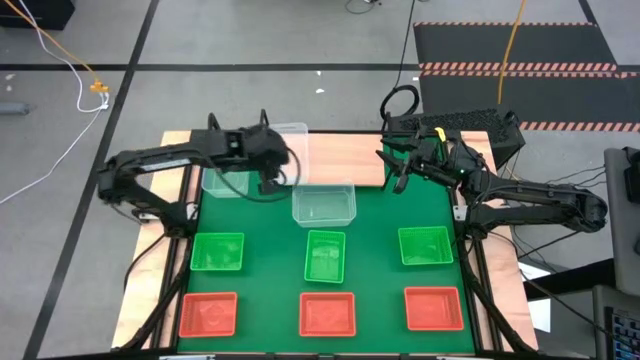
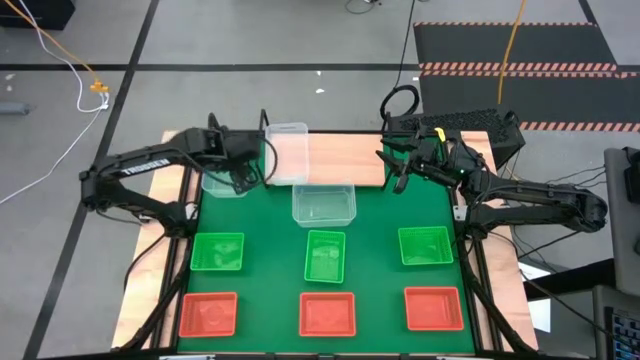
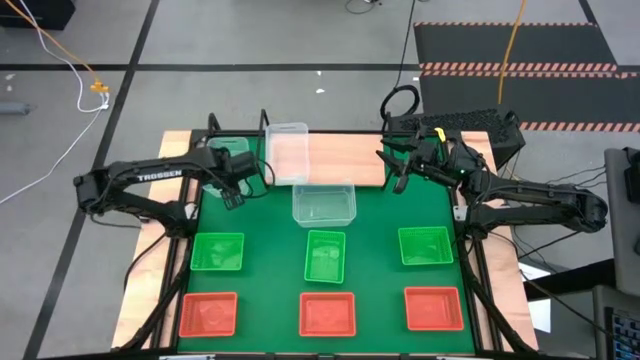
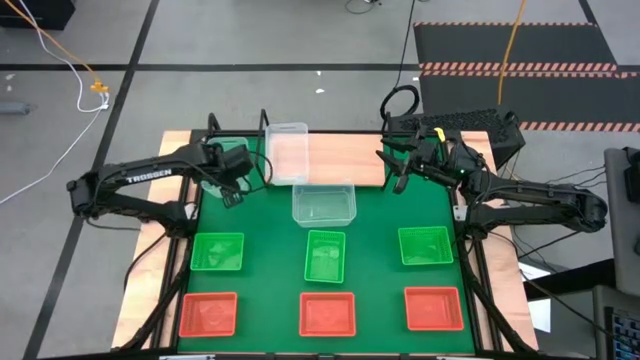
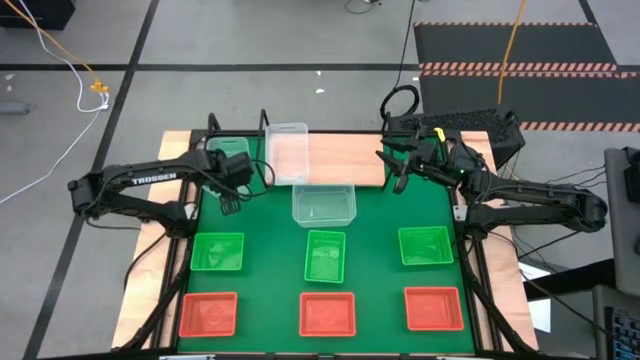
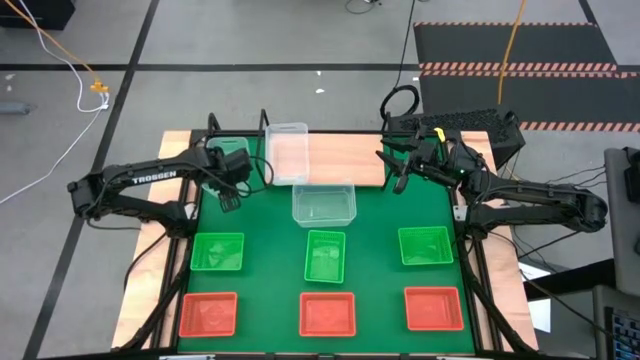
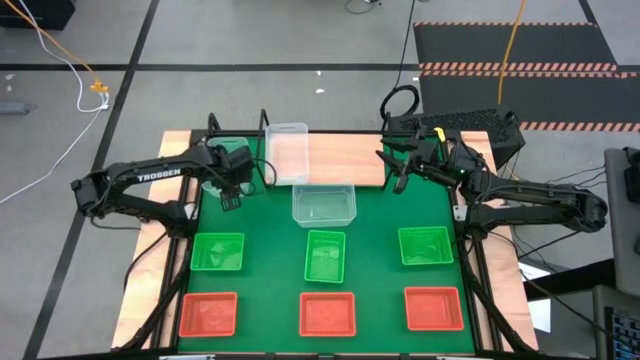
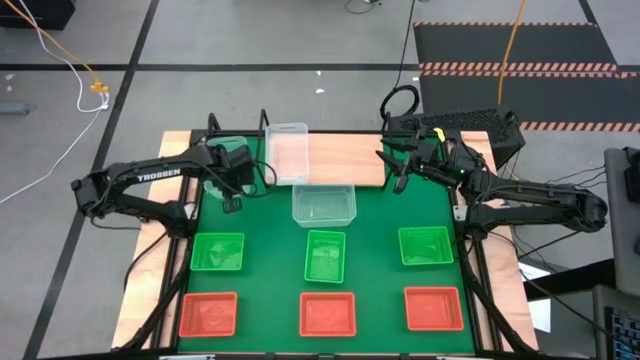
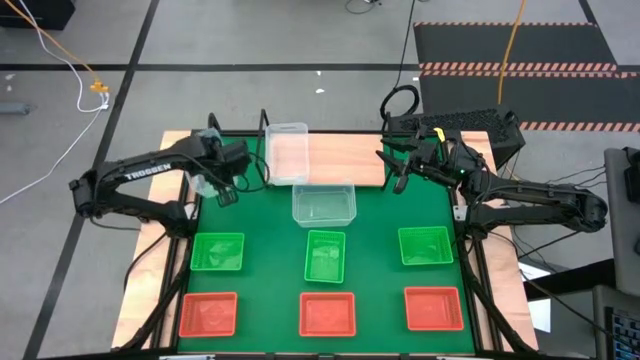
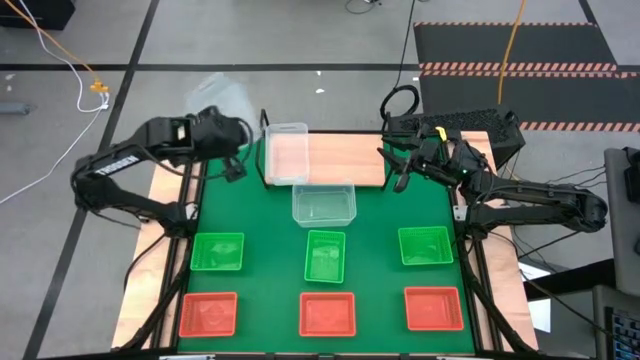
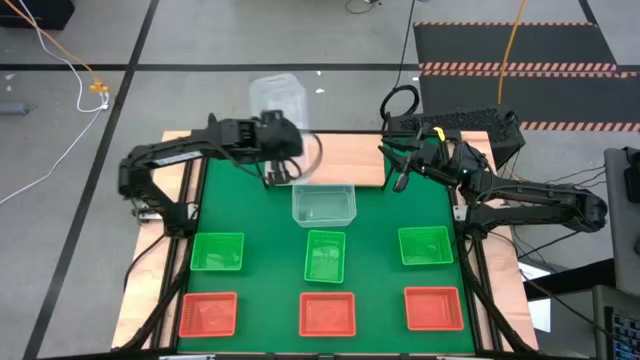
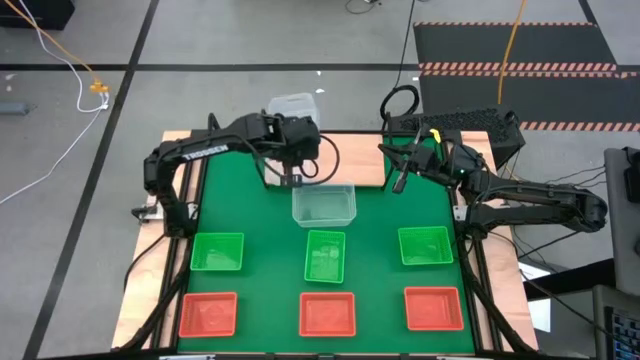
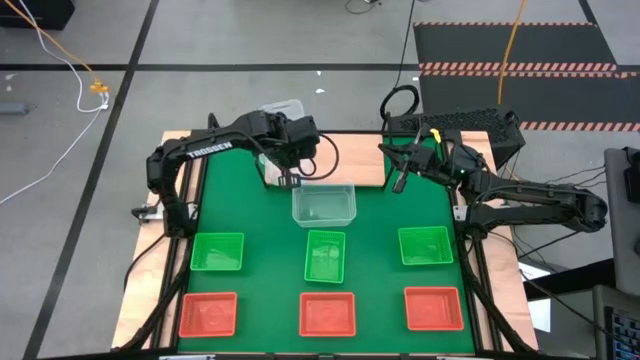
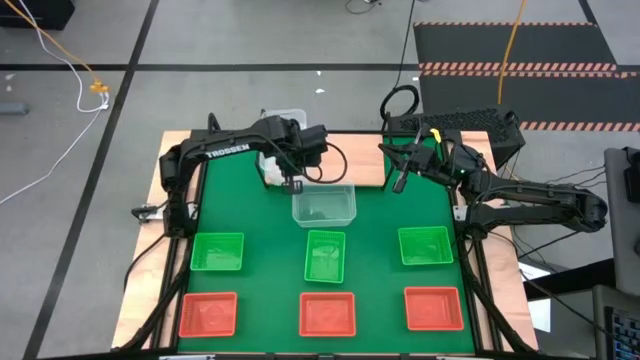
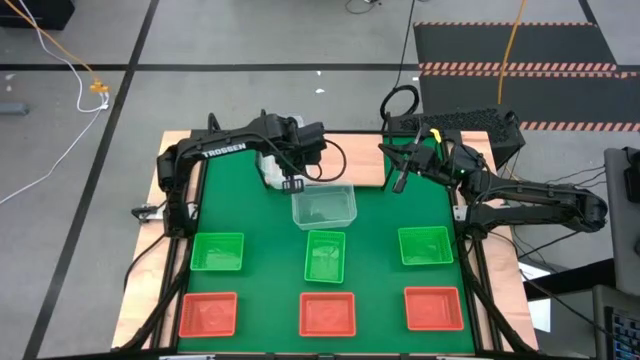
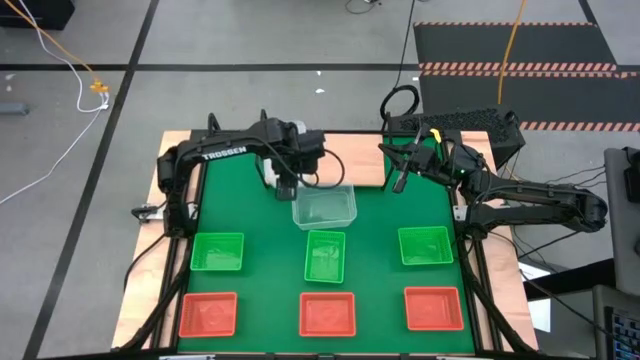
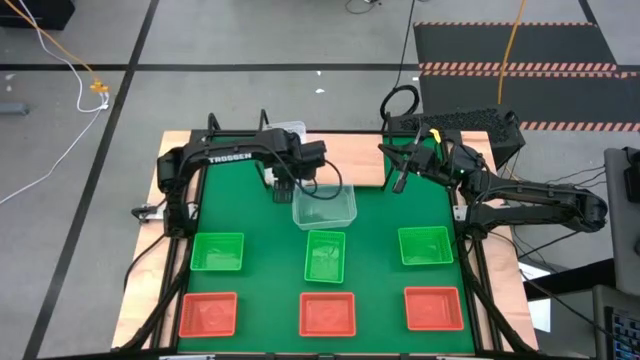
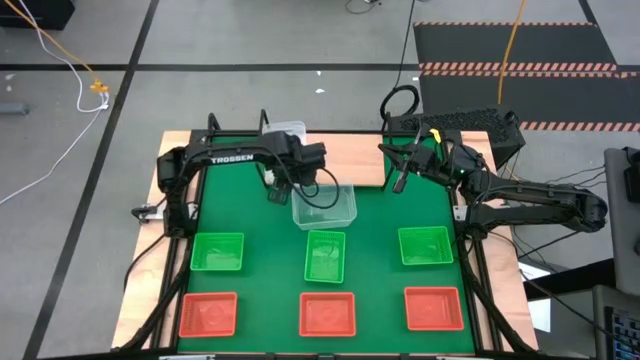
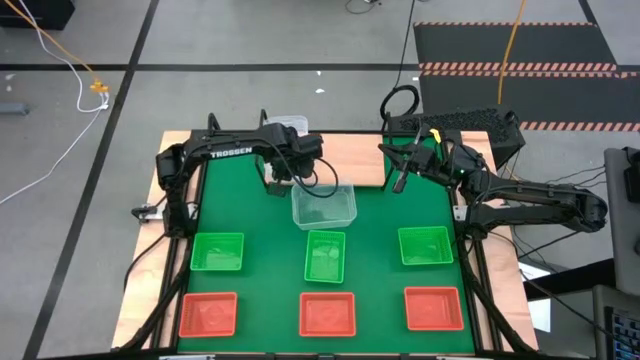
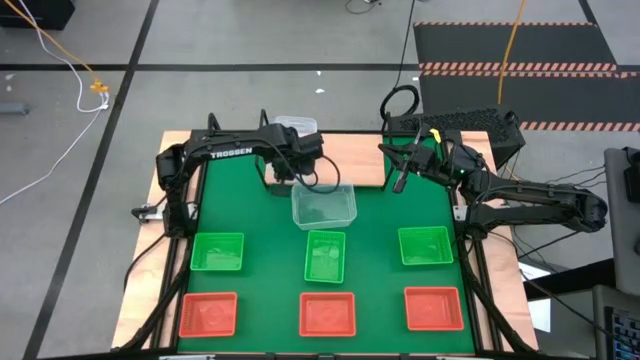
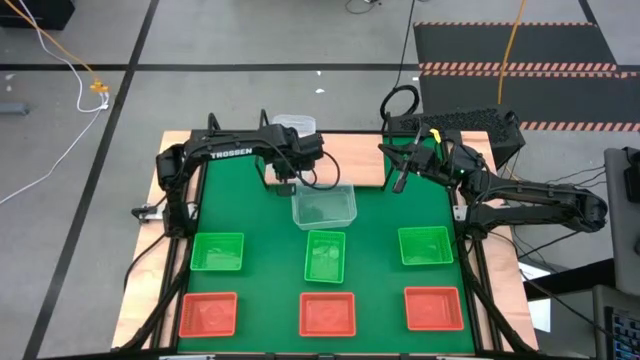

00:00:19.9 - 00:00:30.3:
Task: Stack baskets on shelf by color
Stack the left transparent bin on the top of the other transparent bin on the shelf

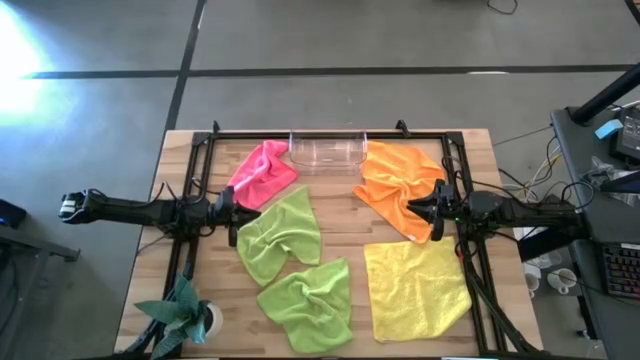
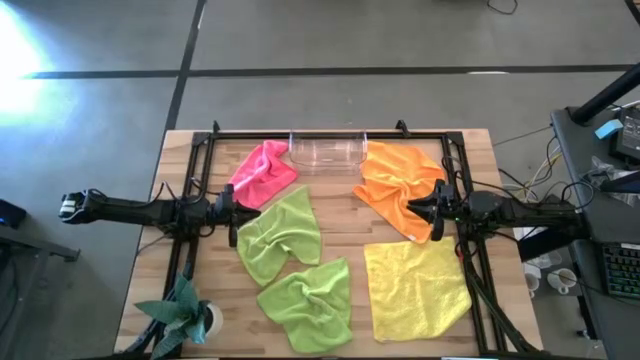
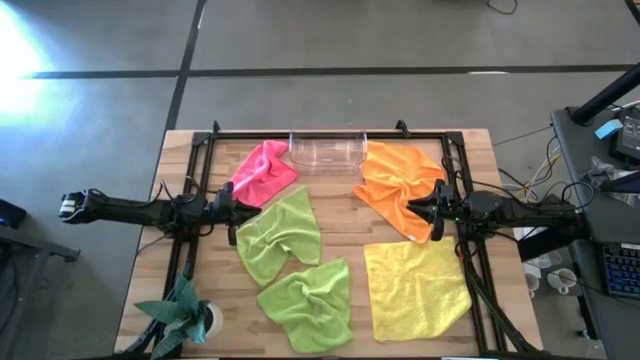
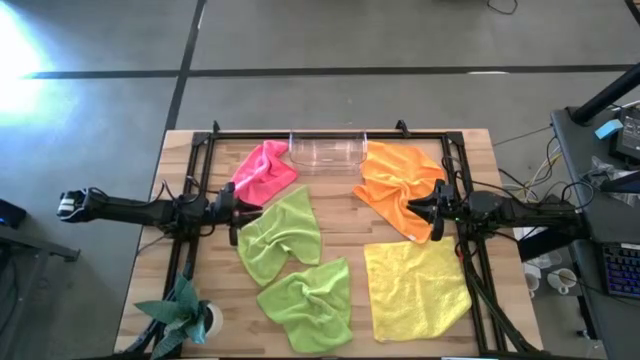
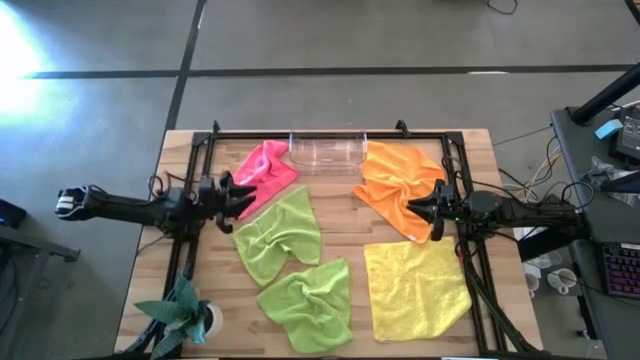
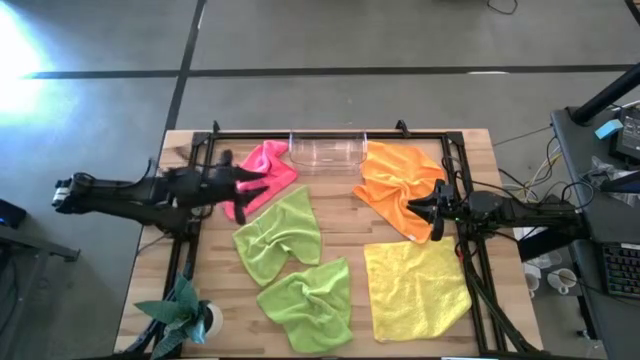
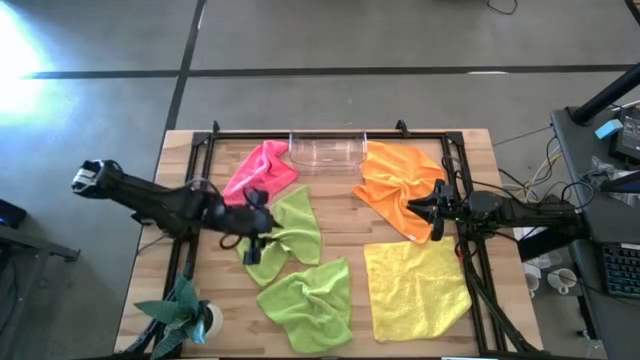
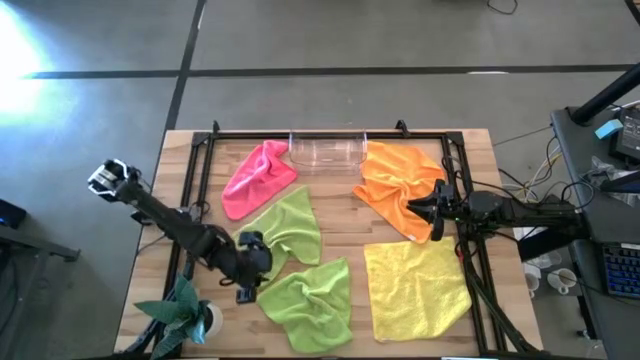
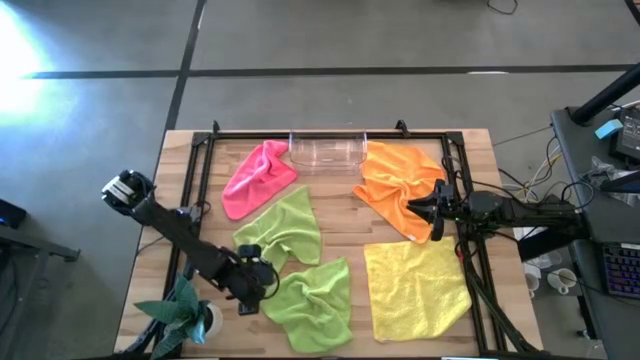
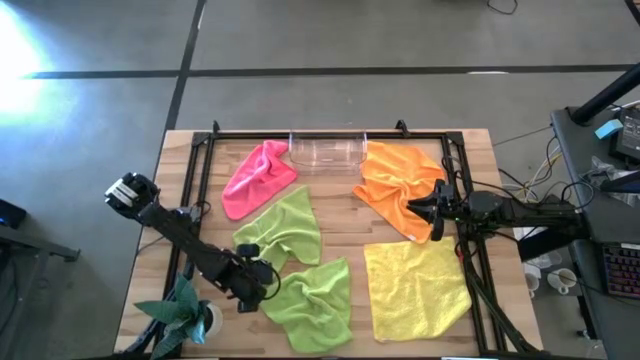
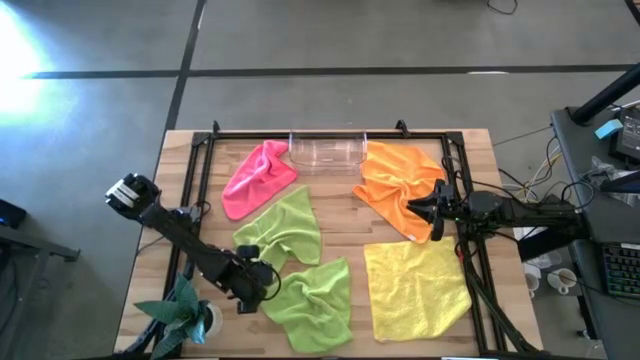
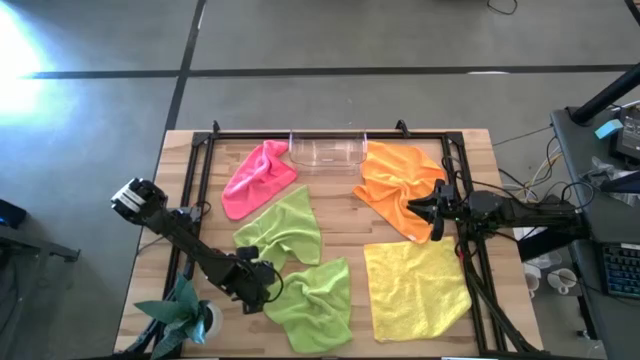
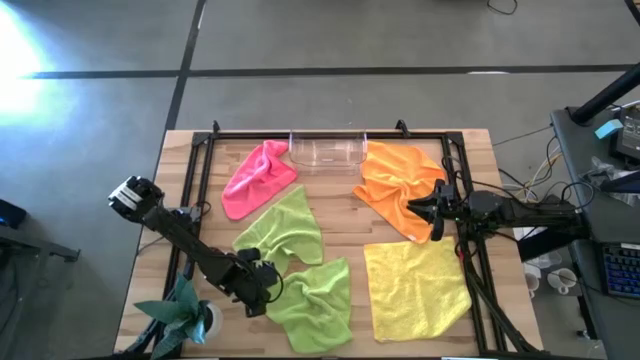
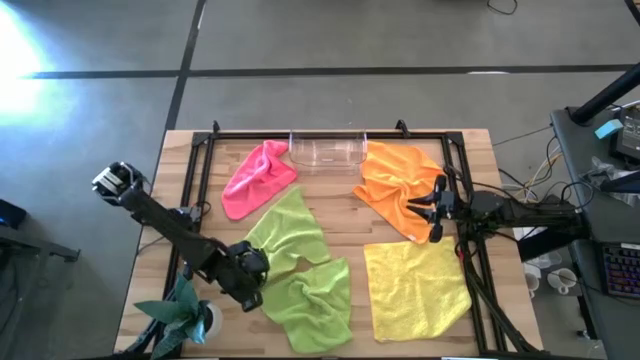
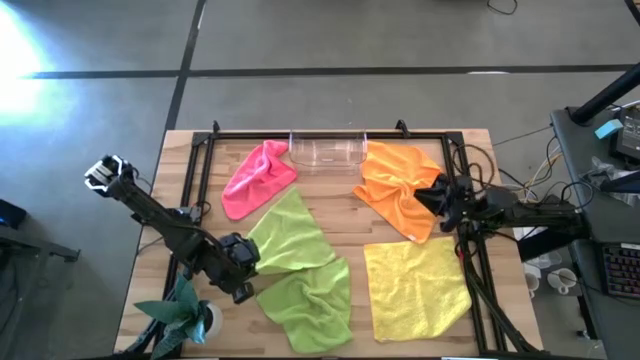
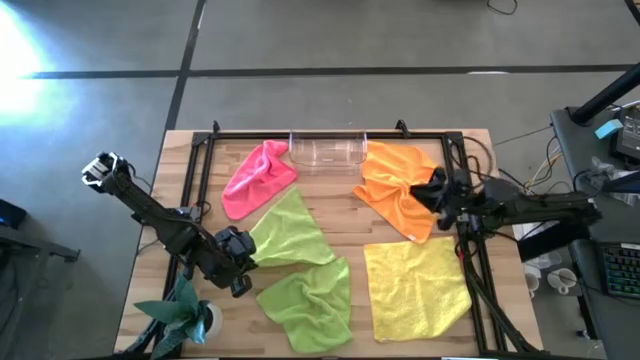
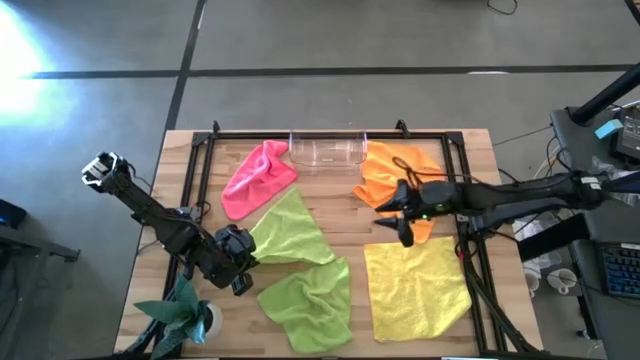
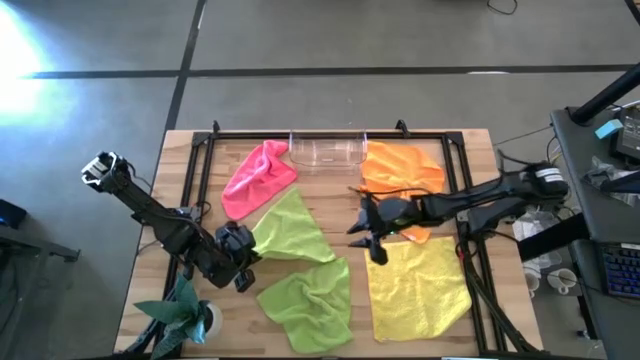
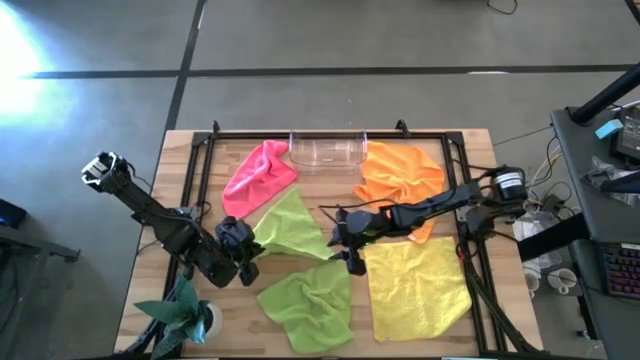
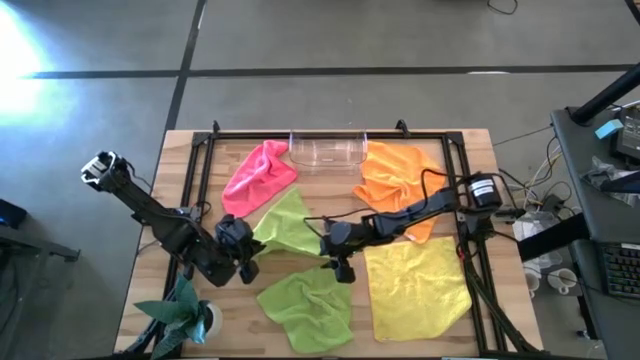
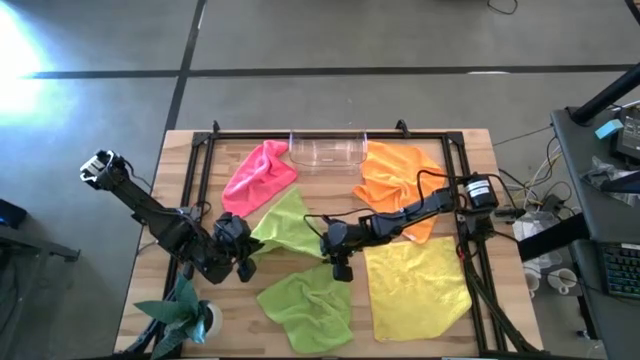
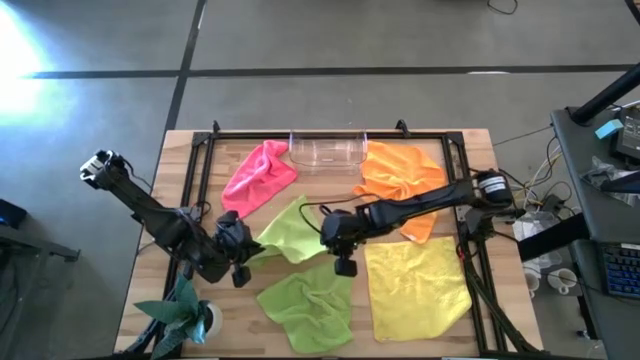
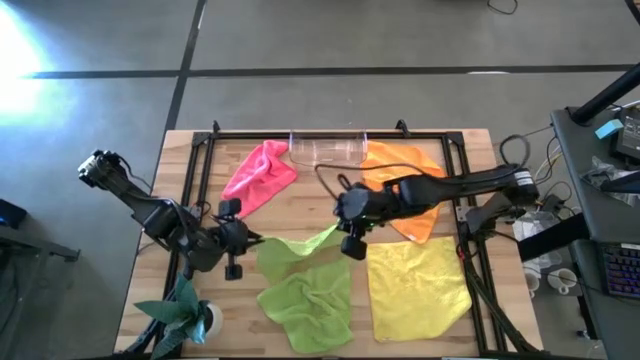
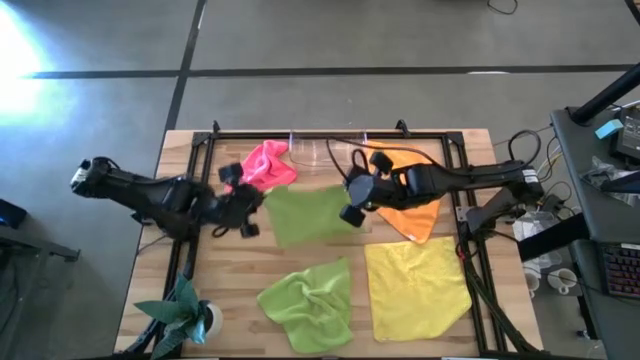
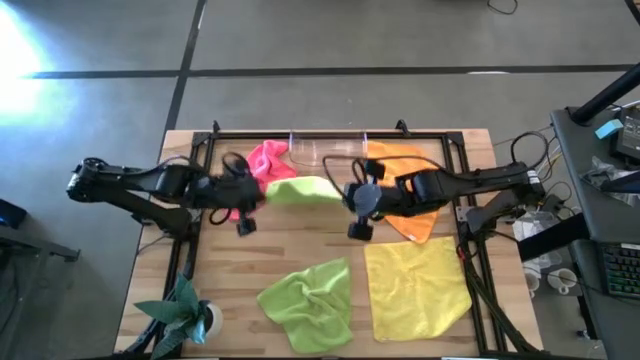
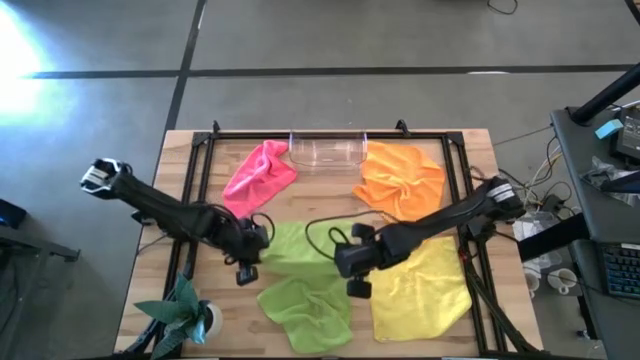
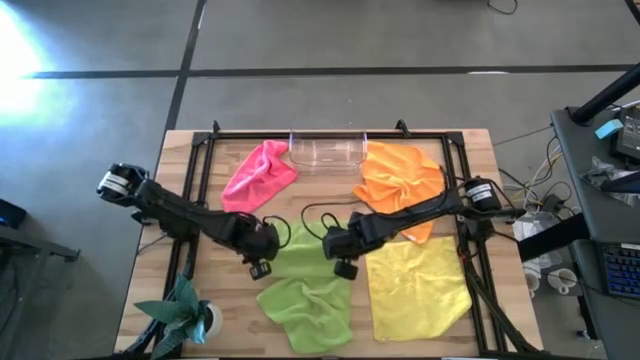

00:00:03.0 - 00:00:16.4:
Task: Fold microfiber towels
Fold the top green microfiber towel
